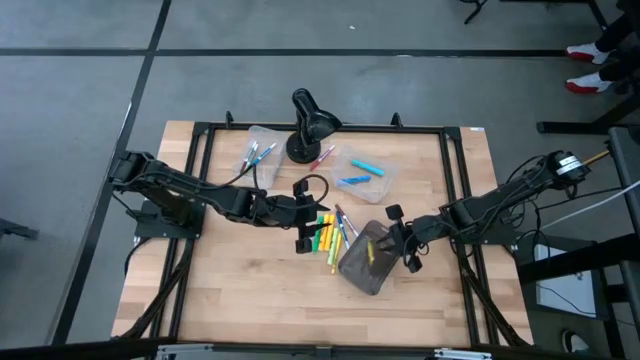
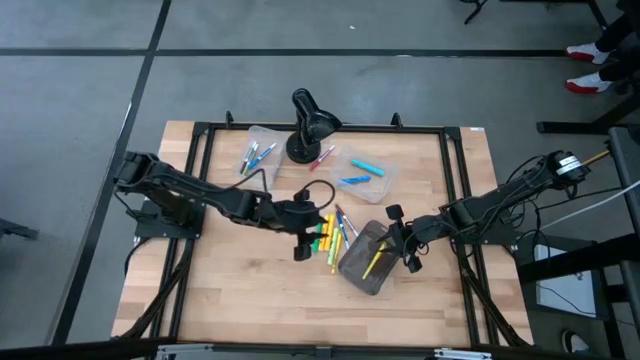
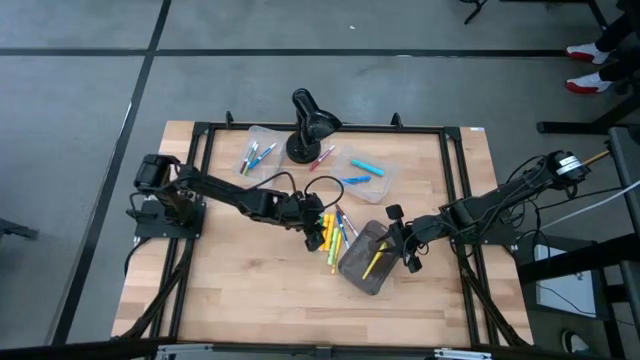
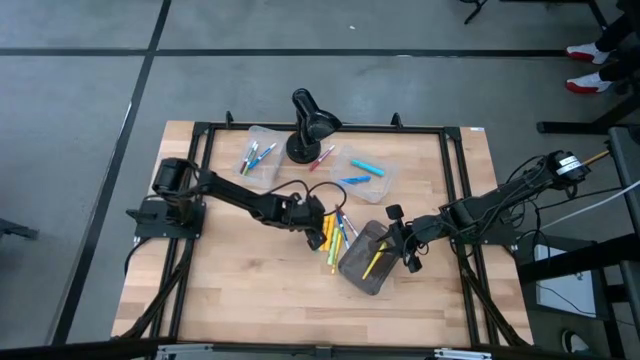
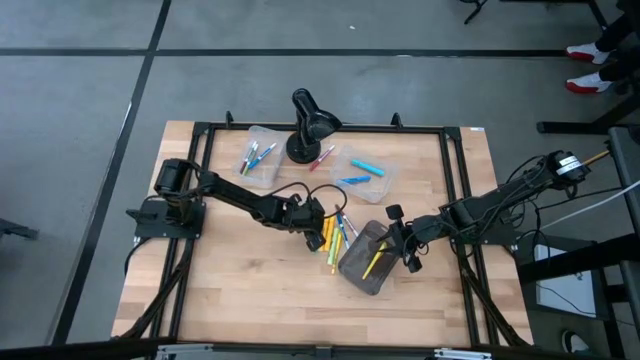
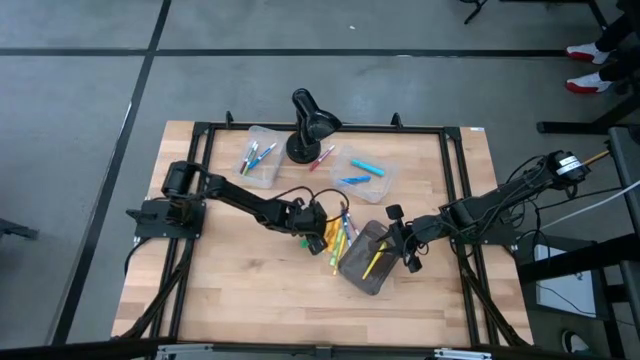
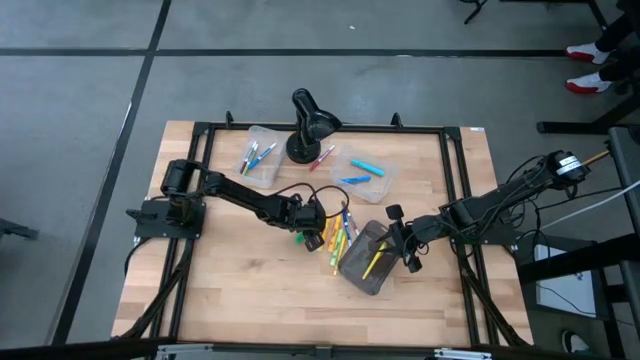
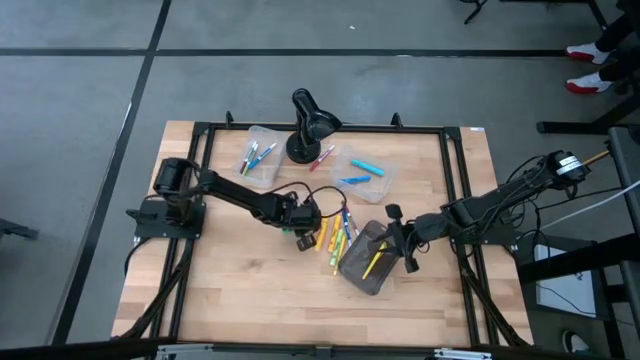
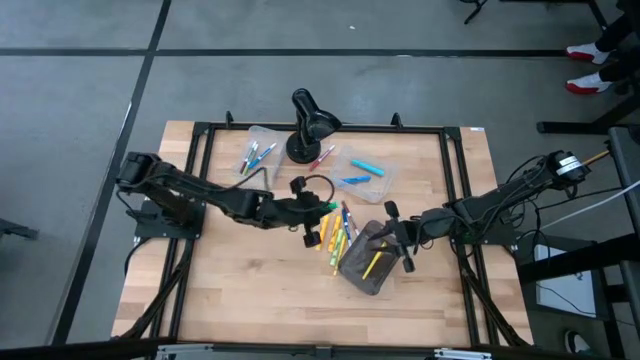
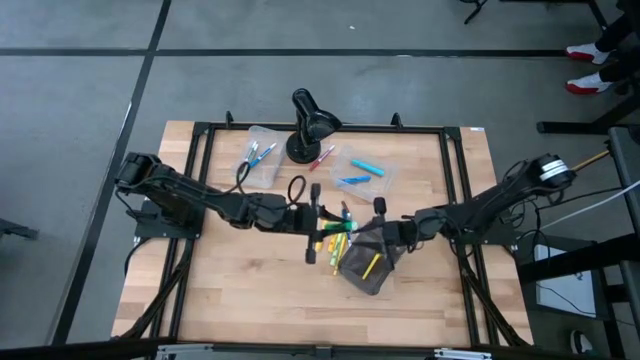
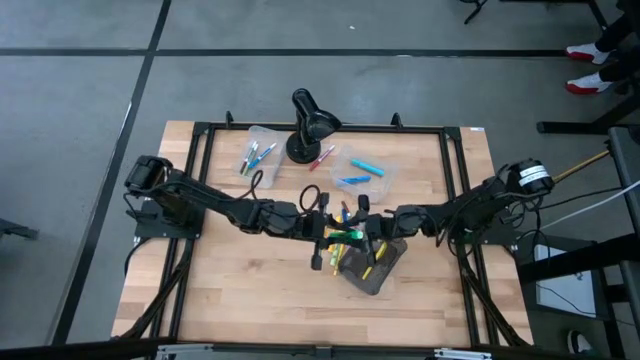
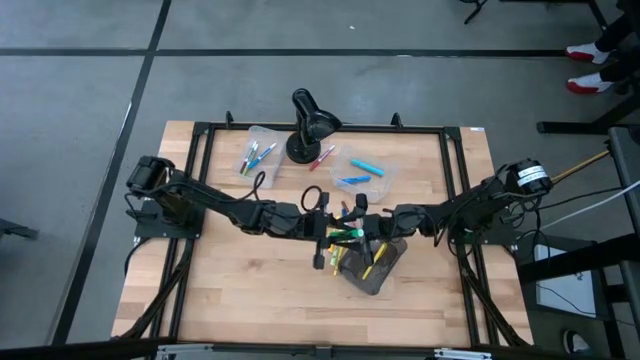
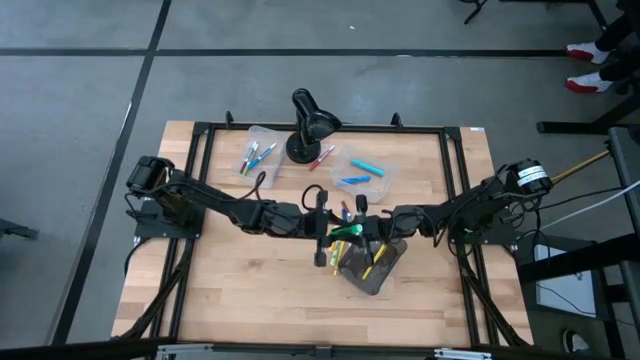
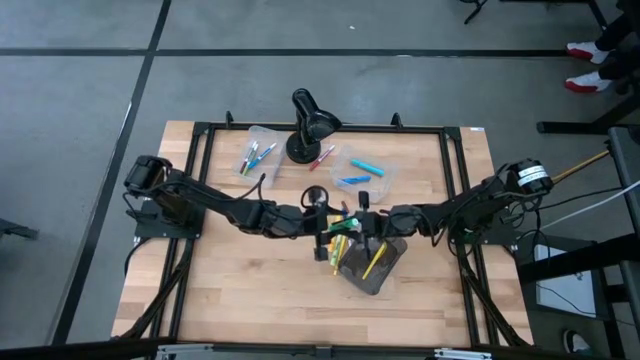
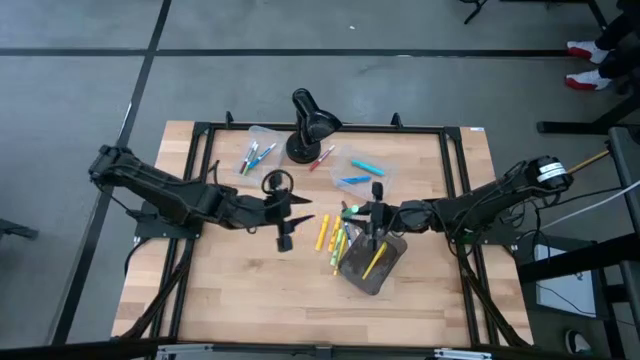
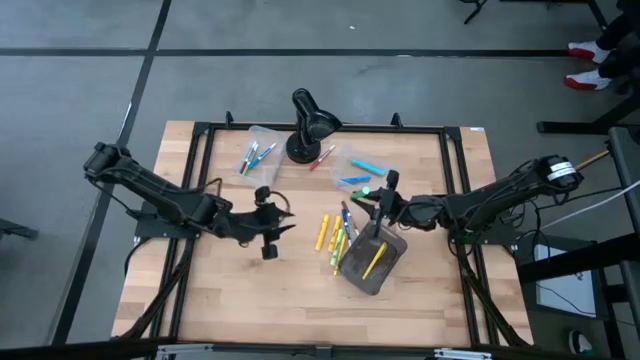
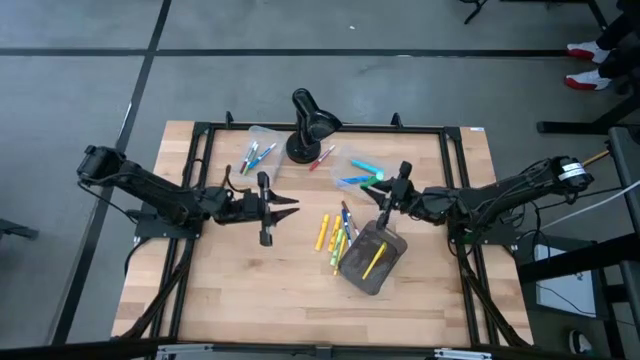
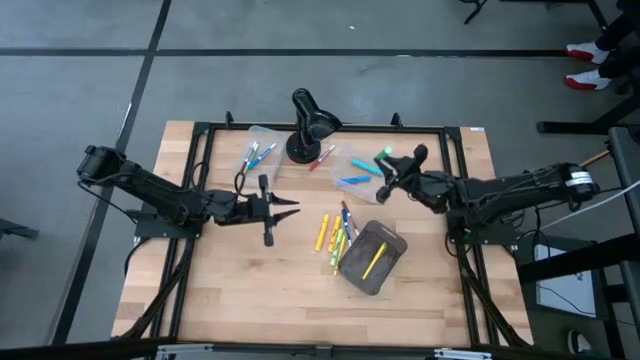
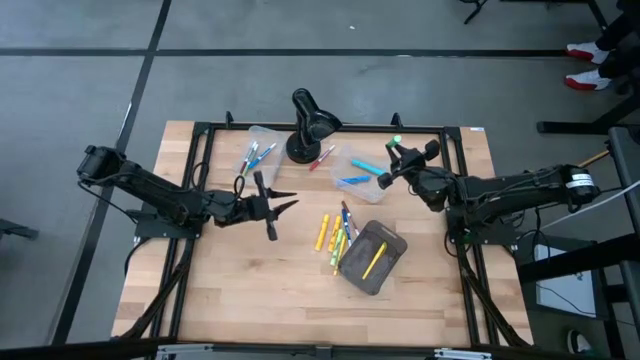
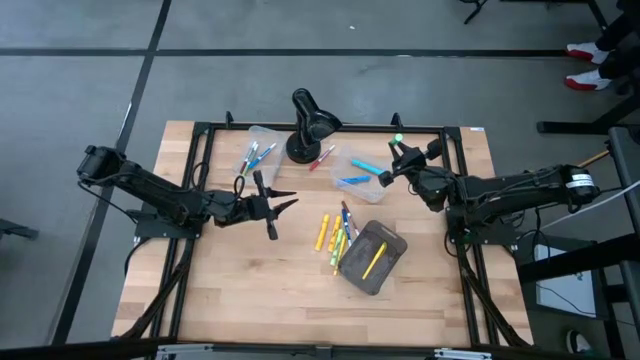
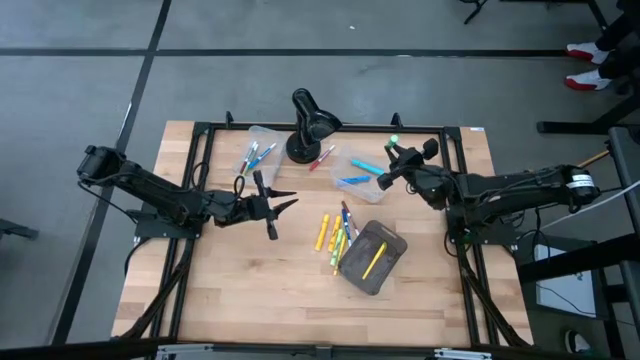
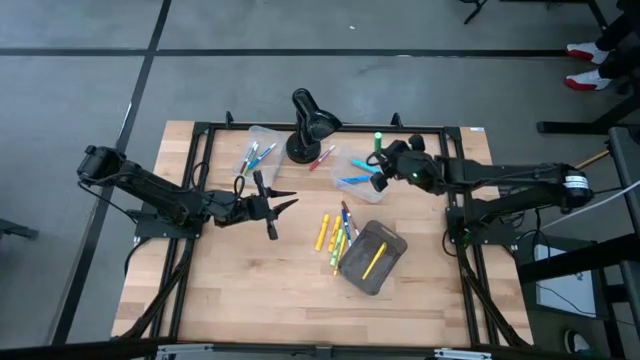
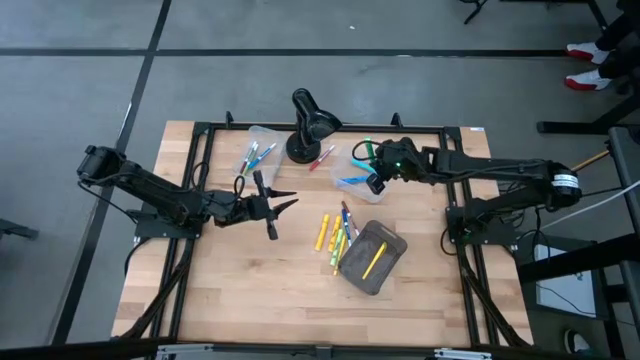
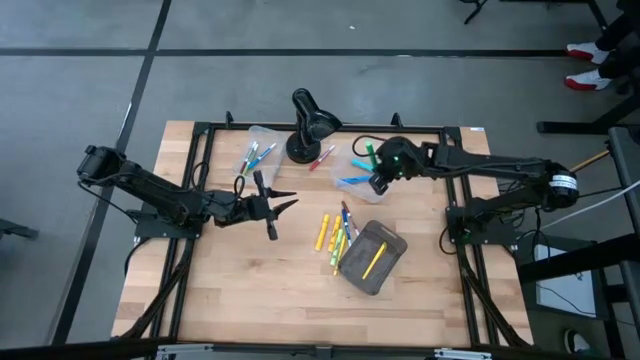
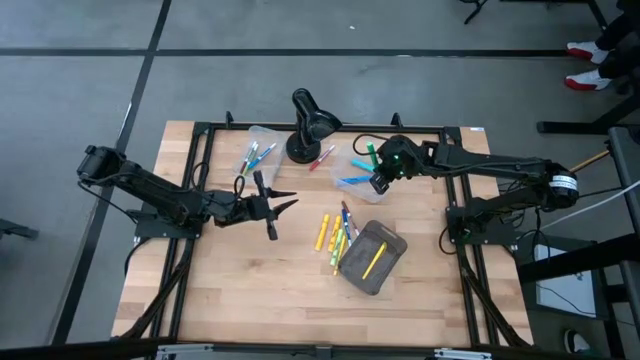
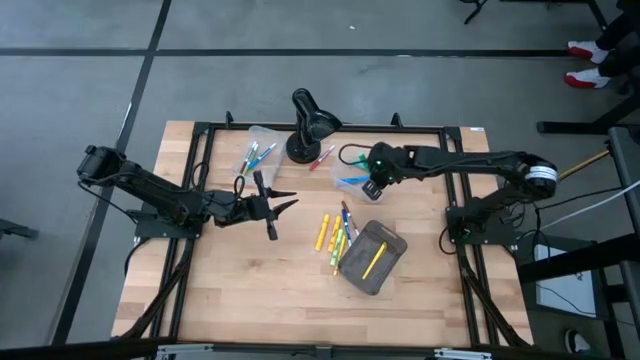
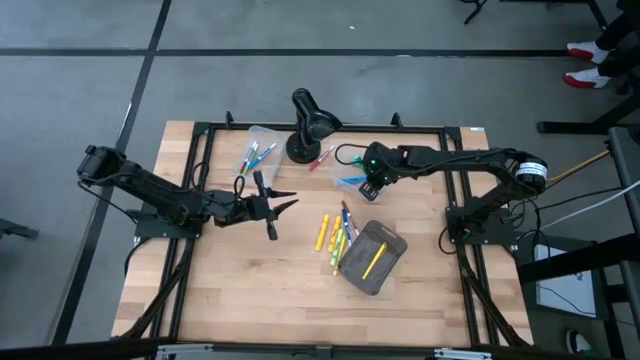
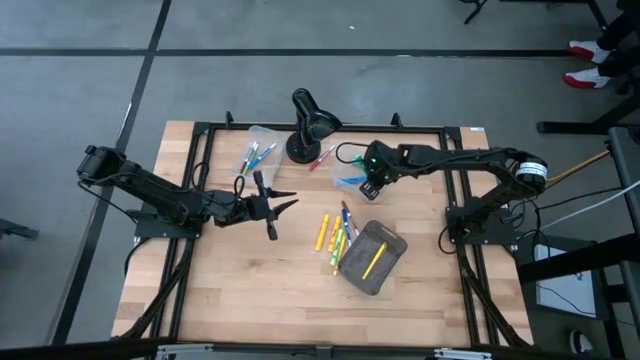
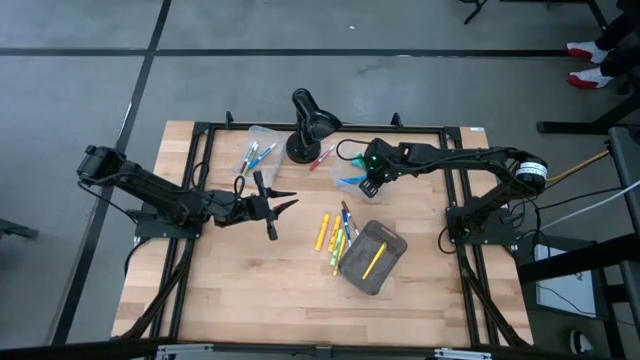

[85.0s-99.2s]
Task: Pick & Place Markers
Put the dark green highlighter pen into the right transparent bin

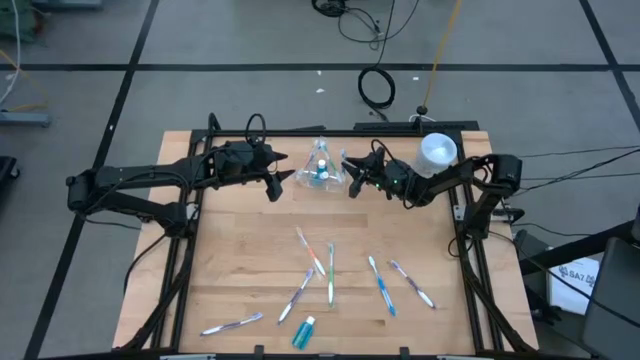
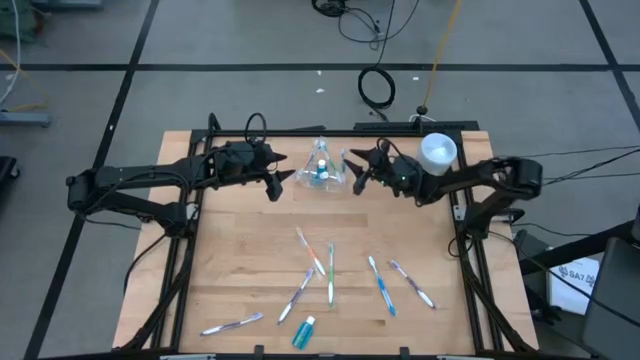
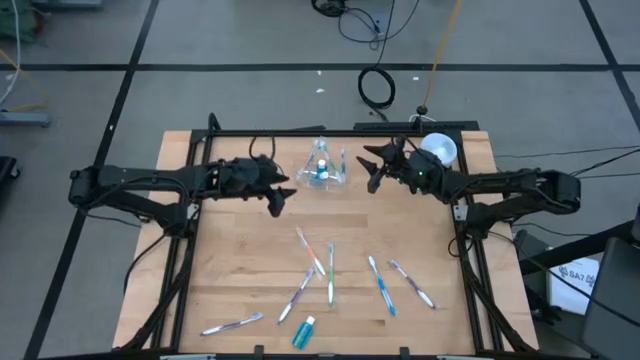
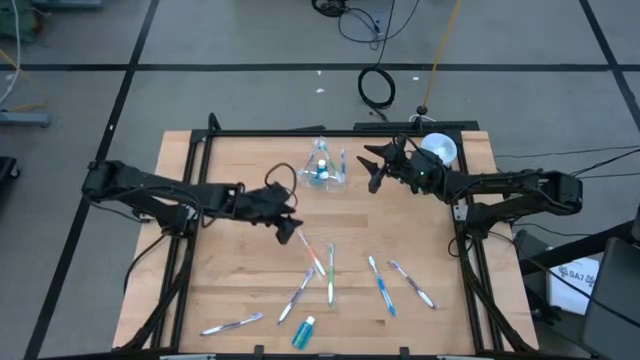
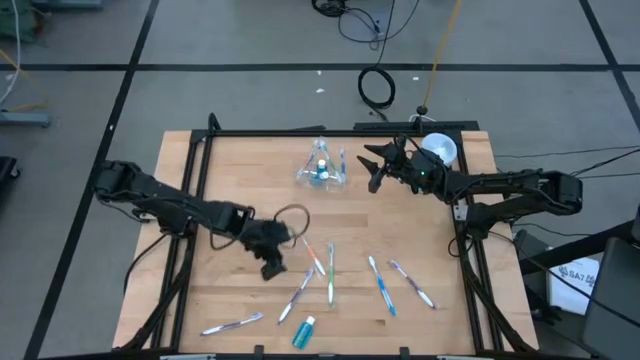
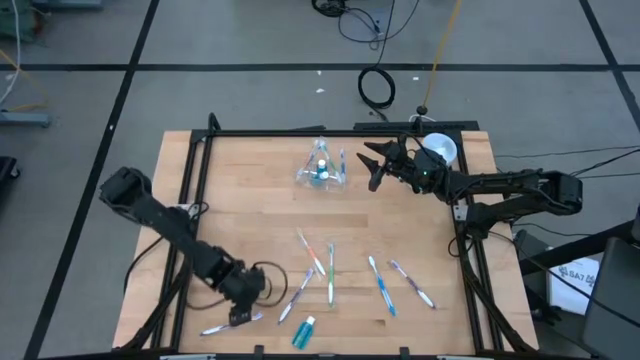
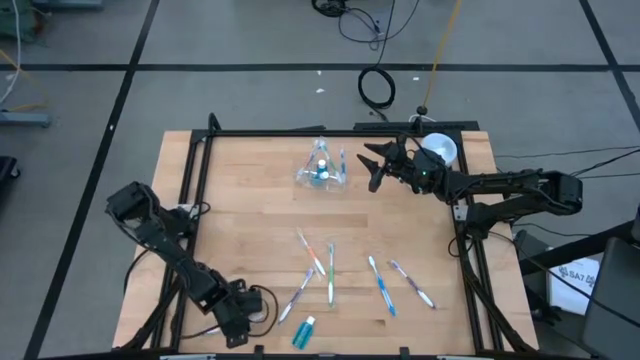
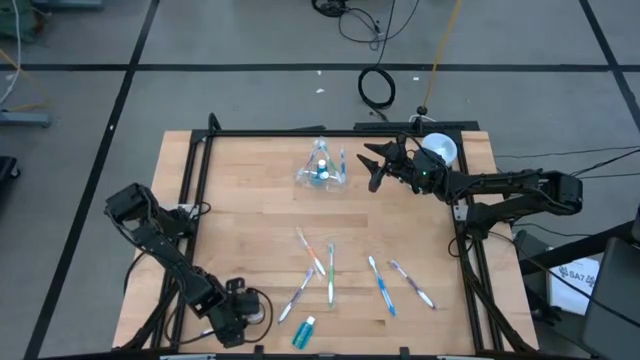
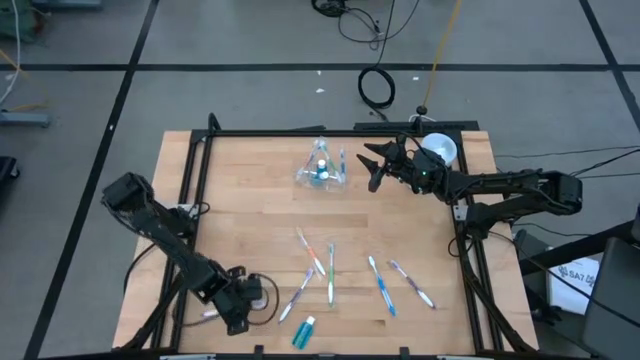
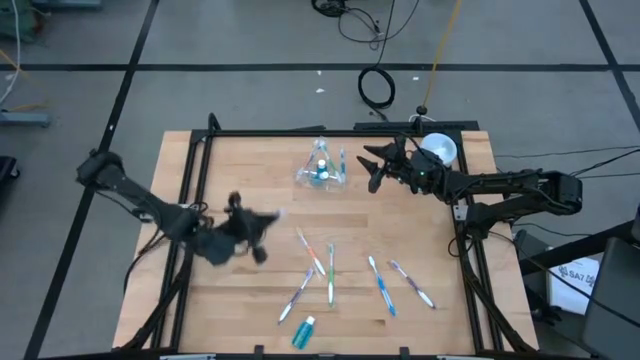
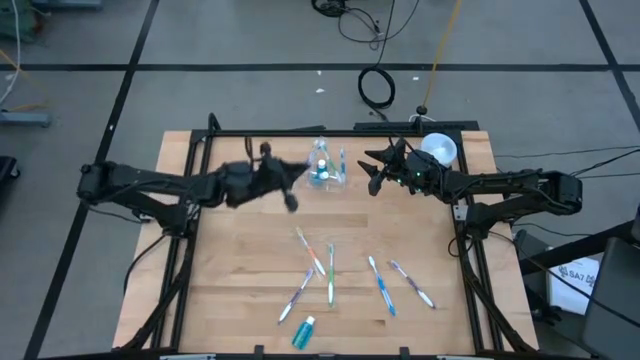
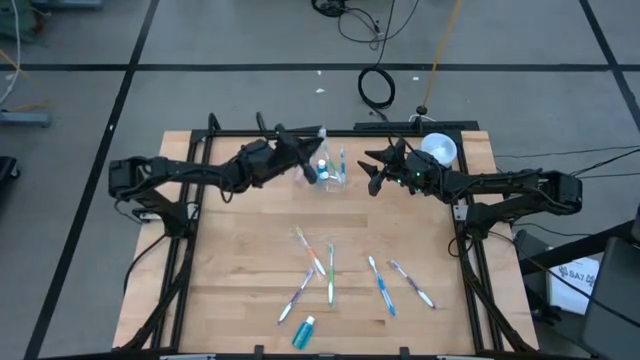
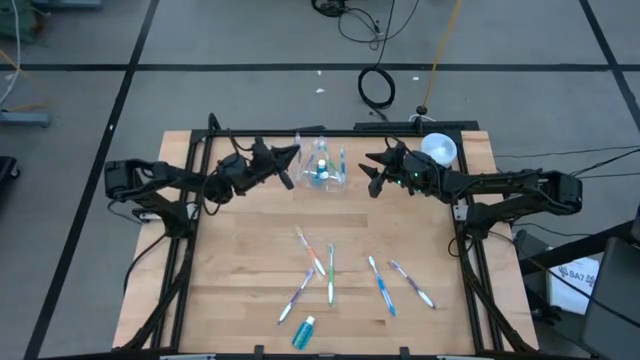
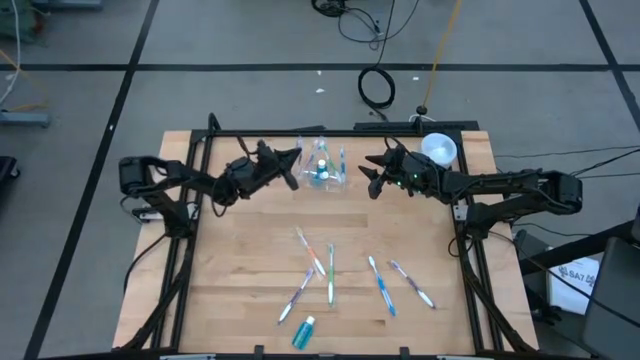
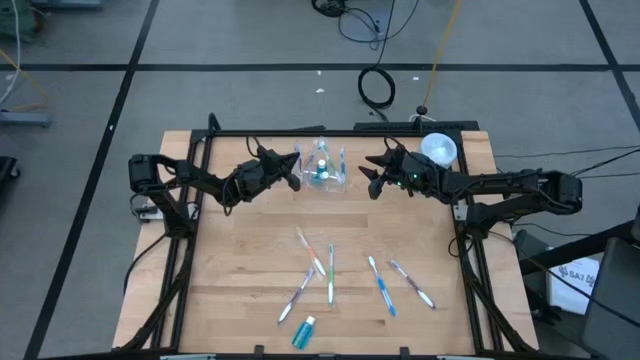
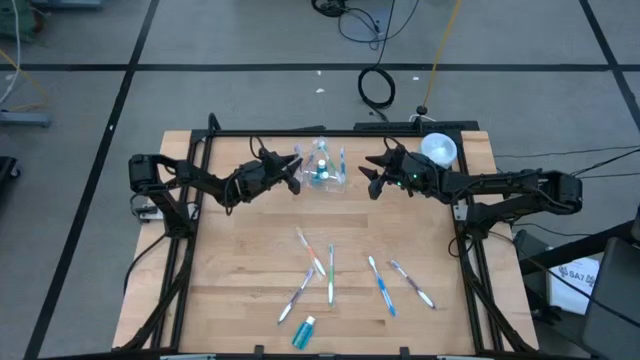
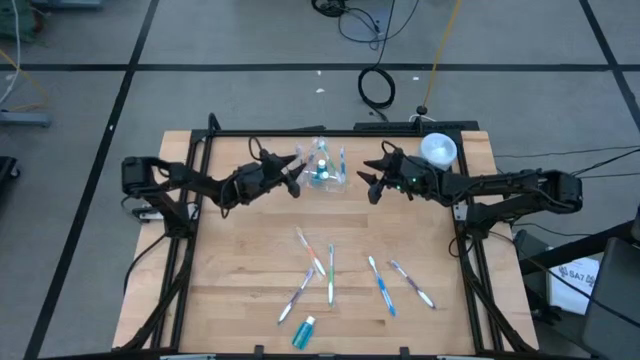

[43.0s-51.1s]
Task: Pick & Place toothbrushing station
Put the bottom violet toothbrush into the transparent organizer
